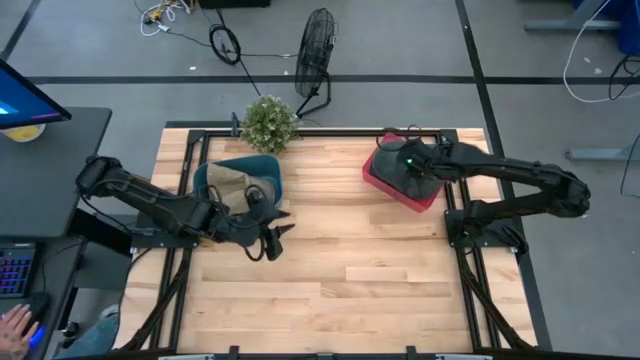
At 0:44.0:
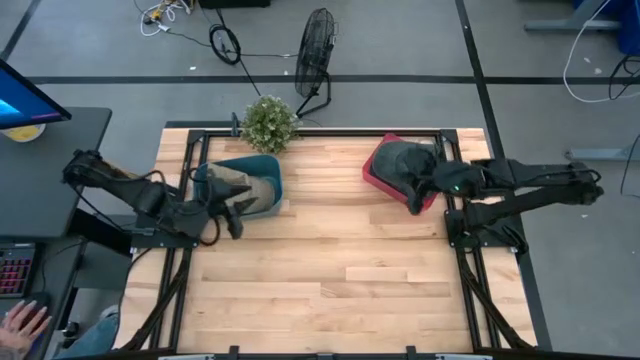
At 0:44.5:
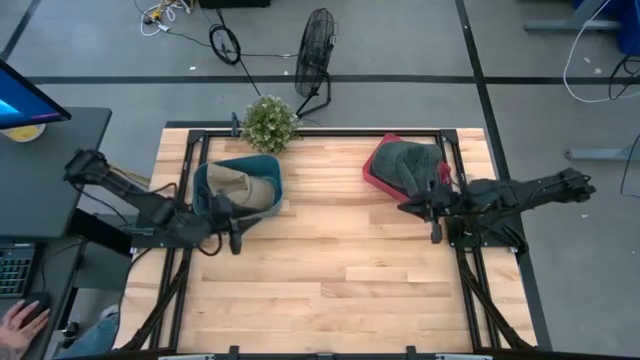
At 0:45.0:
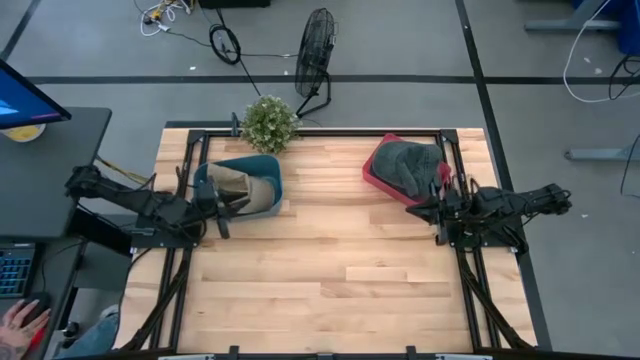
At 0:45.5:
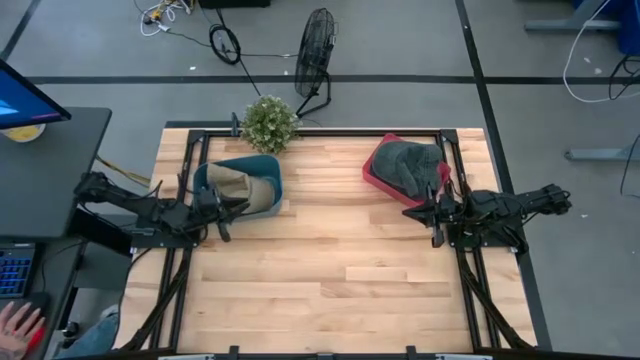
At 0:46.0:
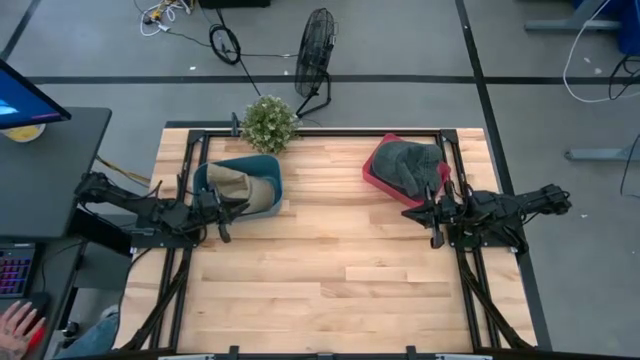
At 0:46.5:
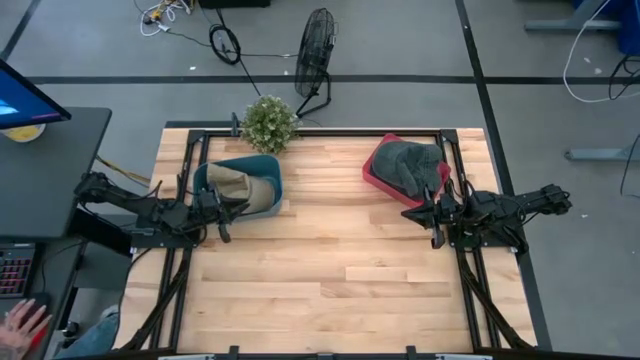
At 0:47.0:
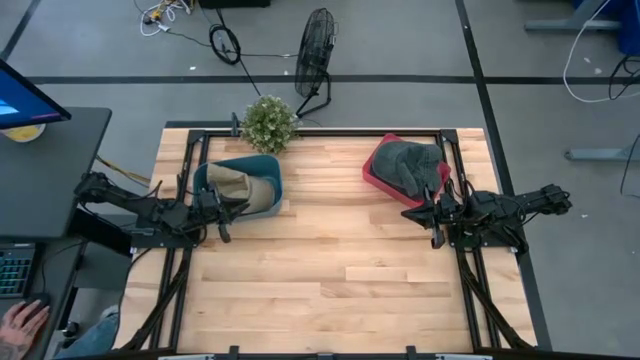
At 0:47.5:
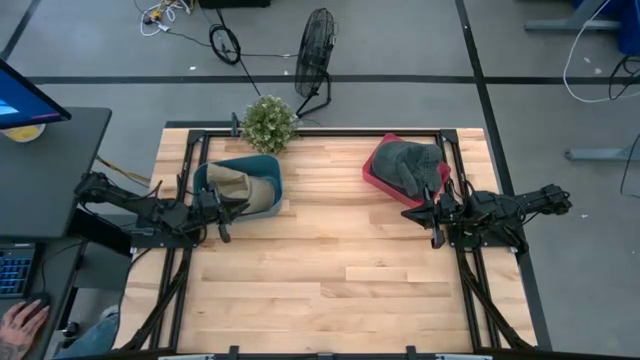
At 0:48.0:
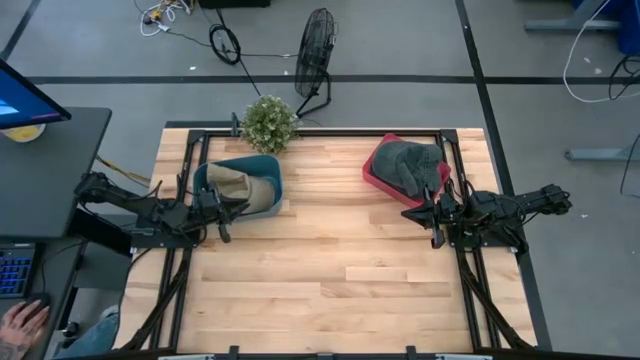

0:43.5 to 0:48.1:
Task: Pick & Place hat
Return to Home Position

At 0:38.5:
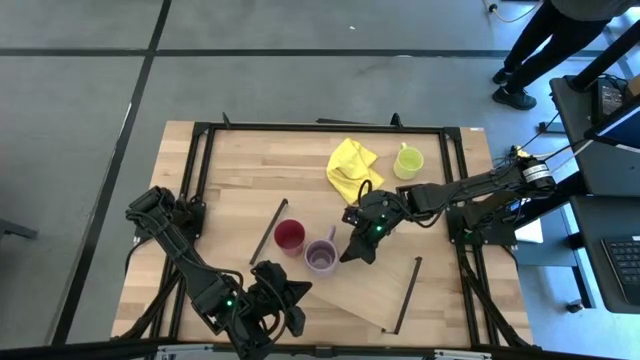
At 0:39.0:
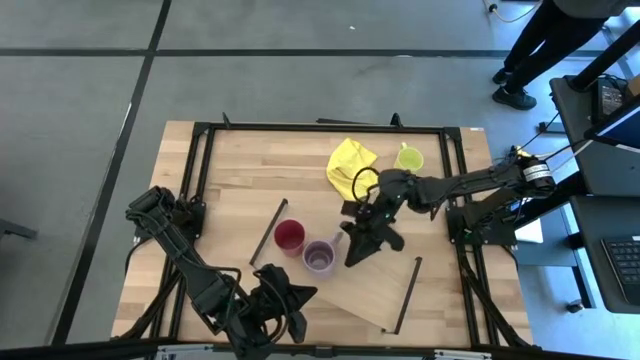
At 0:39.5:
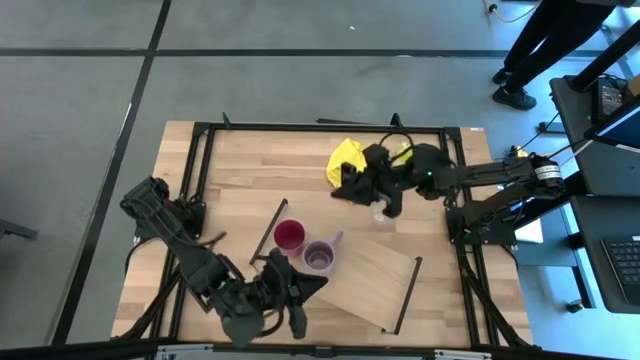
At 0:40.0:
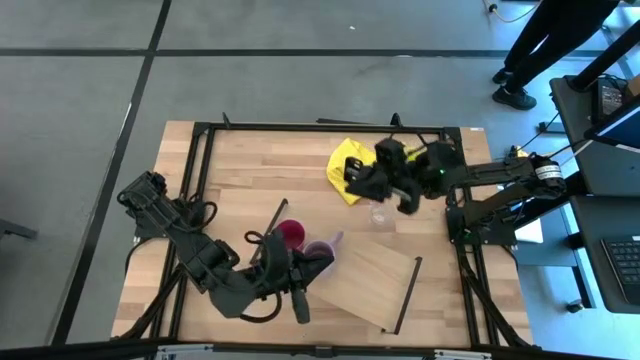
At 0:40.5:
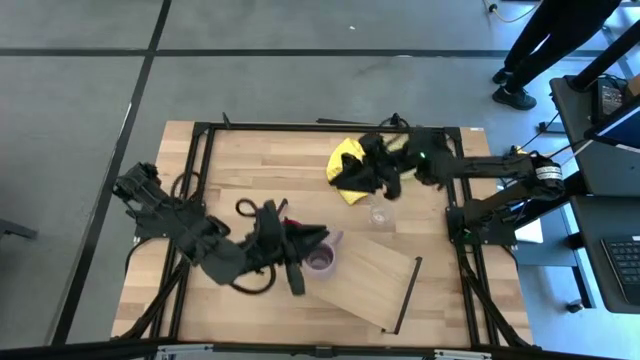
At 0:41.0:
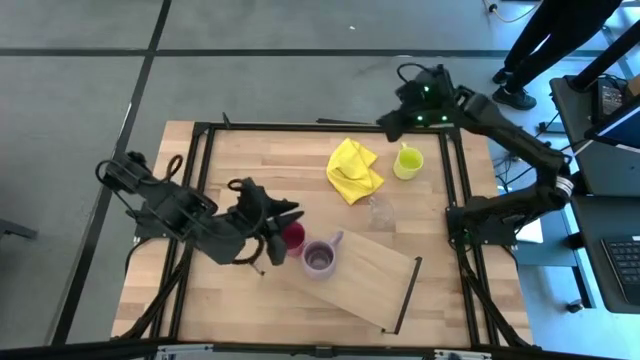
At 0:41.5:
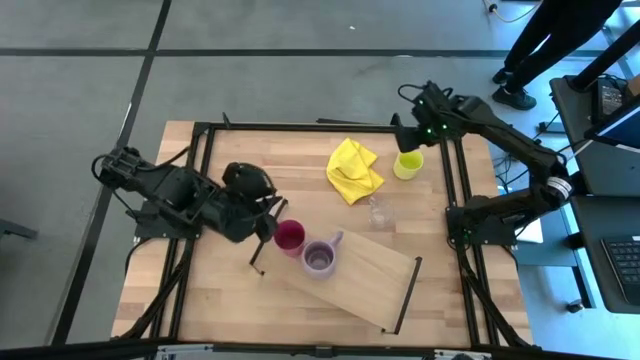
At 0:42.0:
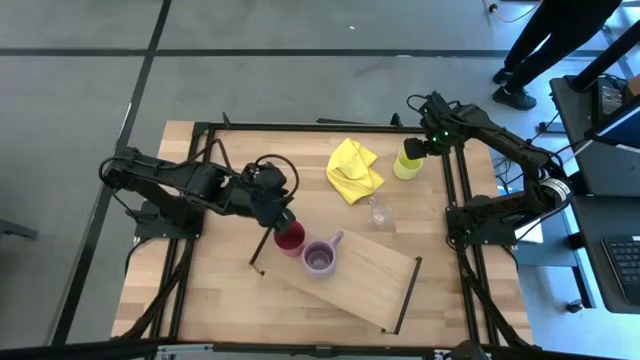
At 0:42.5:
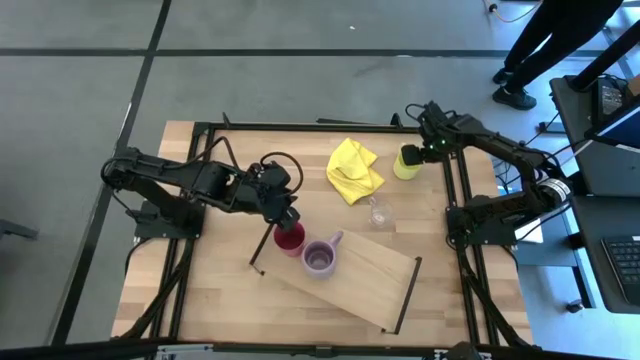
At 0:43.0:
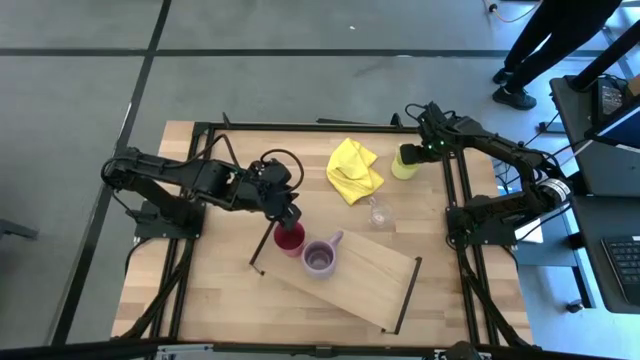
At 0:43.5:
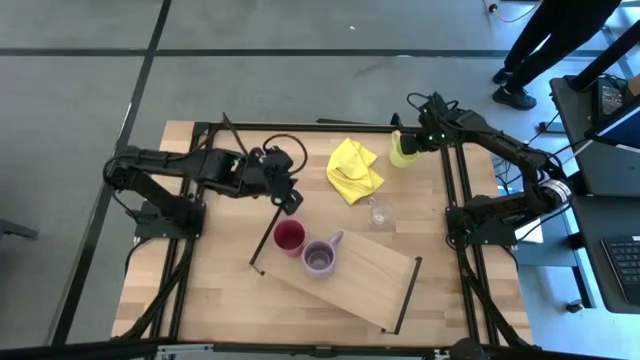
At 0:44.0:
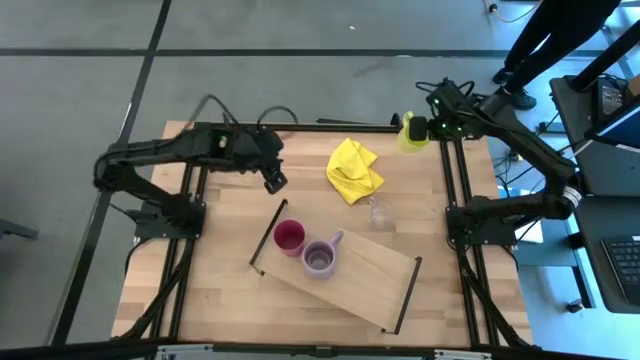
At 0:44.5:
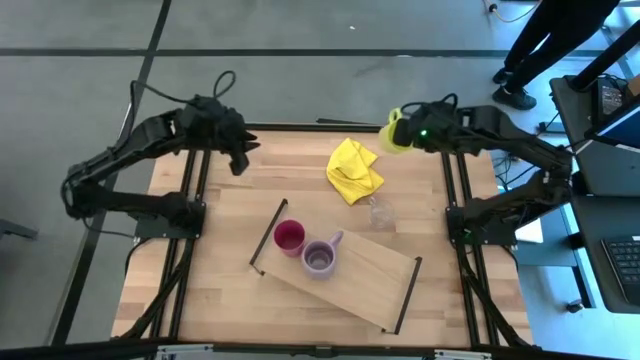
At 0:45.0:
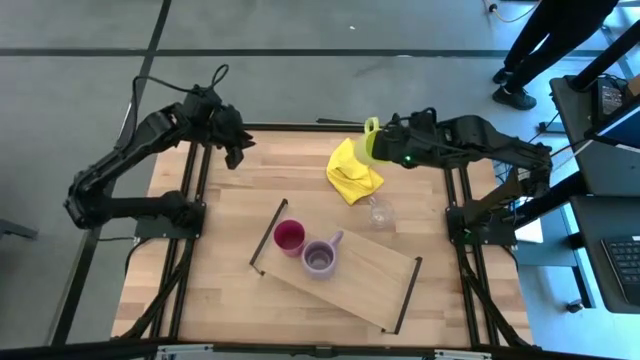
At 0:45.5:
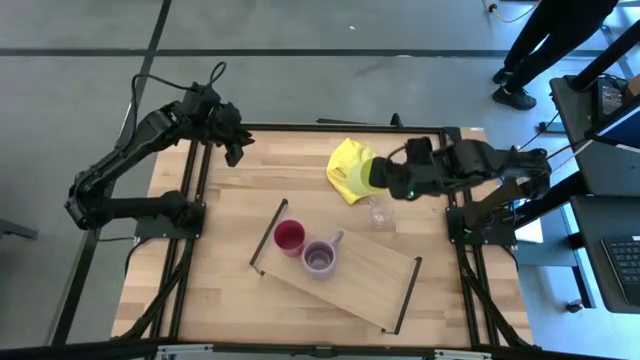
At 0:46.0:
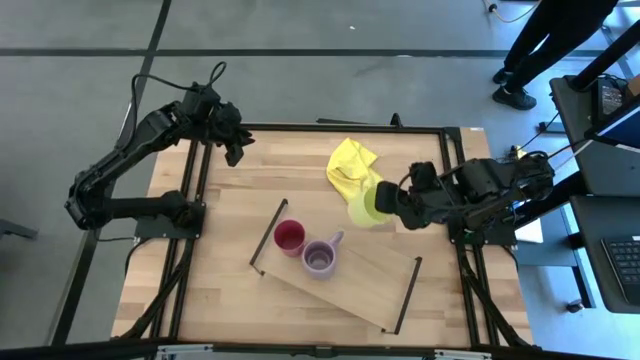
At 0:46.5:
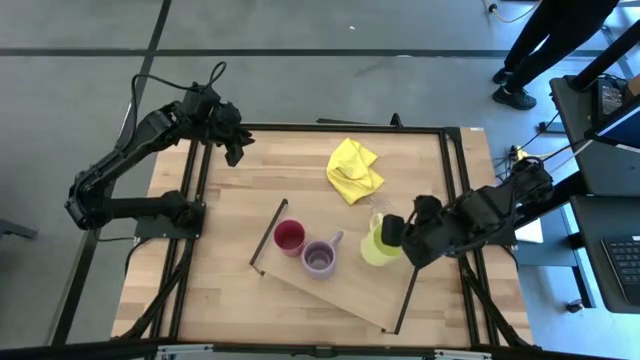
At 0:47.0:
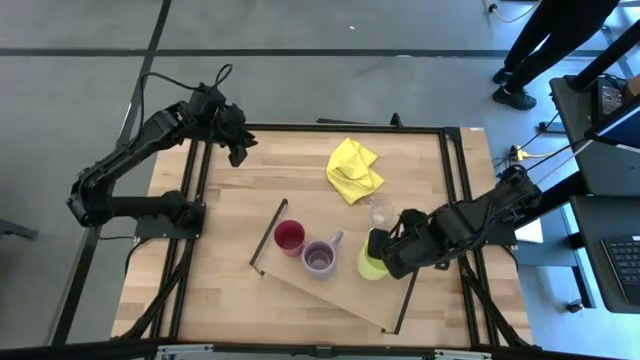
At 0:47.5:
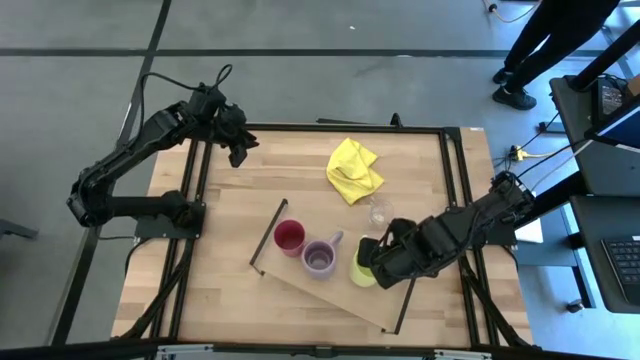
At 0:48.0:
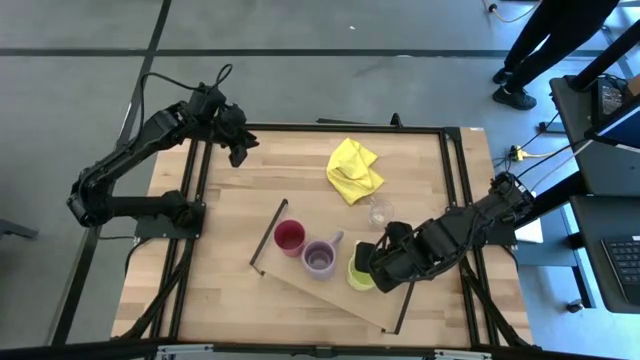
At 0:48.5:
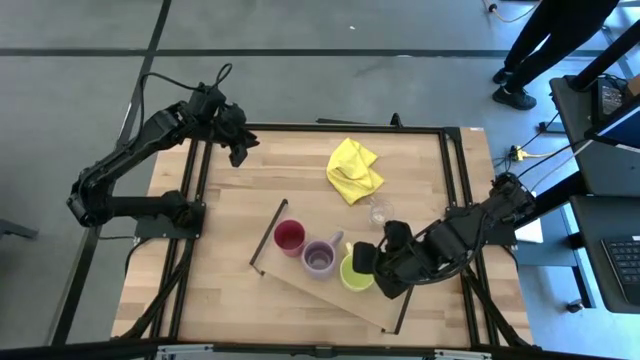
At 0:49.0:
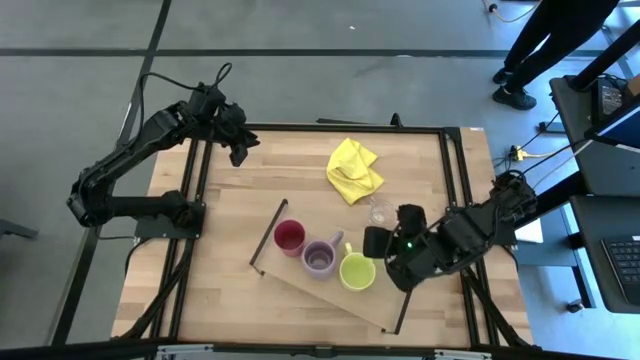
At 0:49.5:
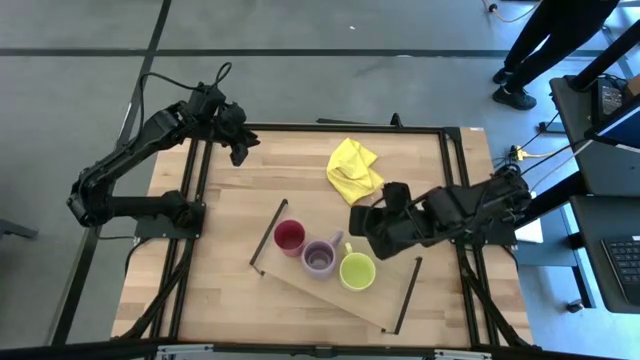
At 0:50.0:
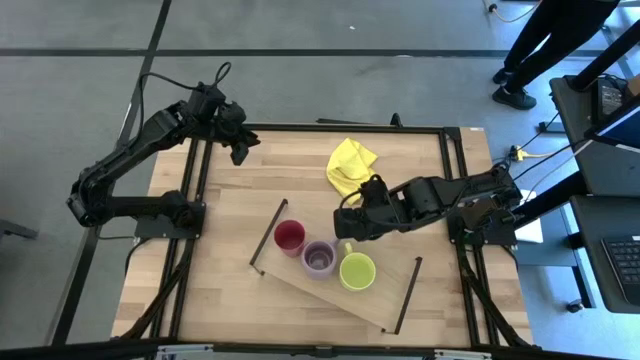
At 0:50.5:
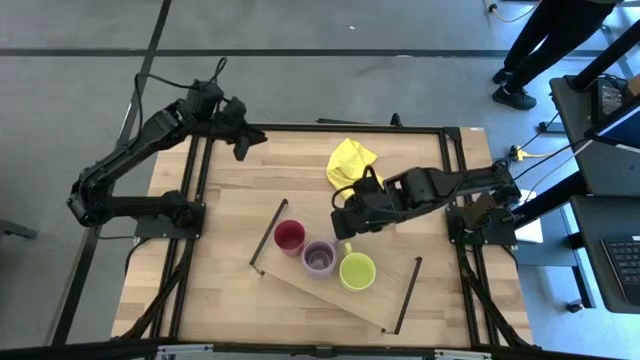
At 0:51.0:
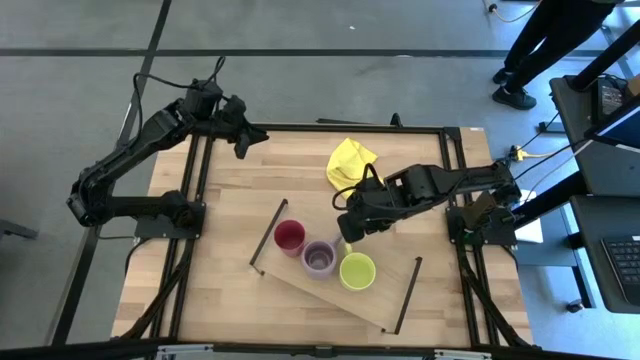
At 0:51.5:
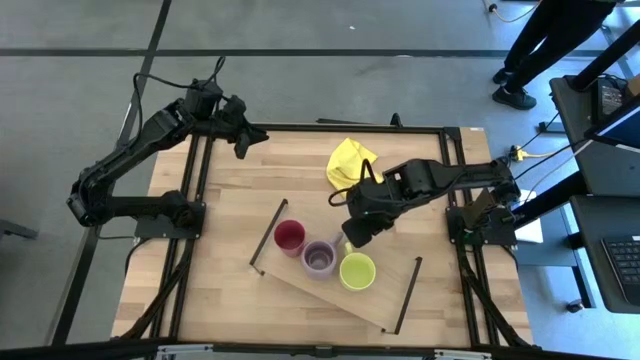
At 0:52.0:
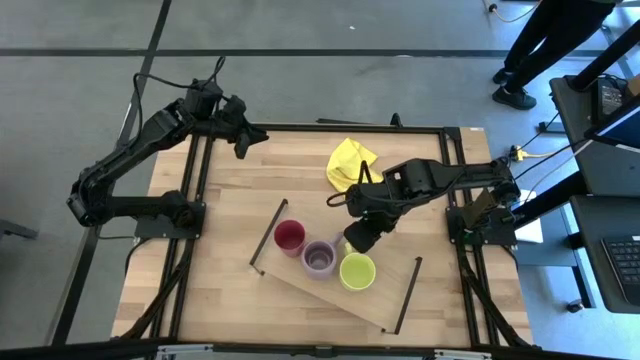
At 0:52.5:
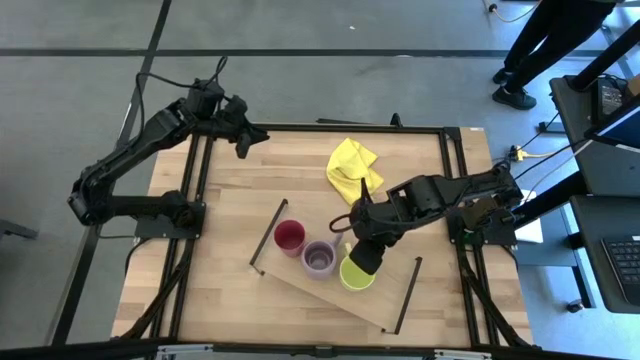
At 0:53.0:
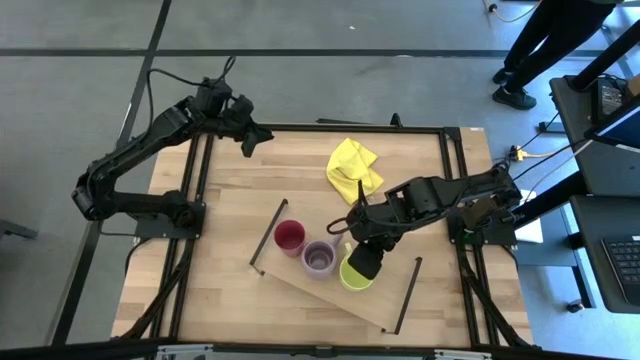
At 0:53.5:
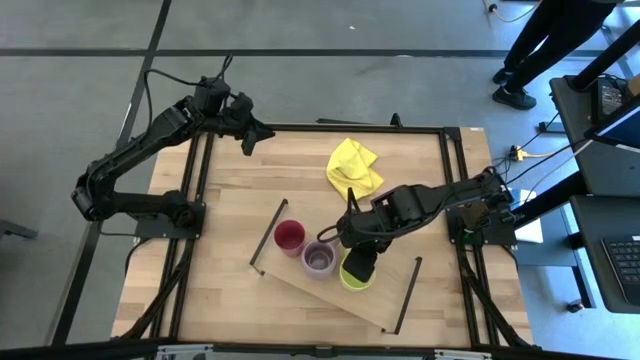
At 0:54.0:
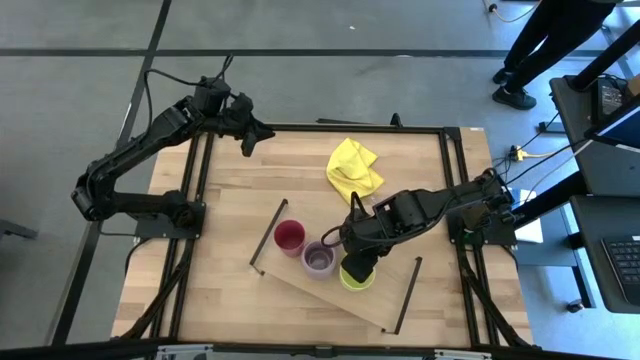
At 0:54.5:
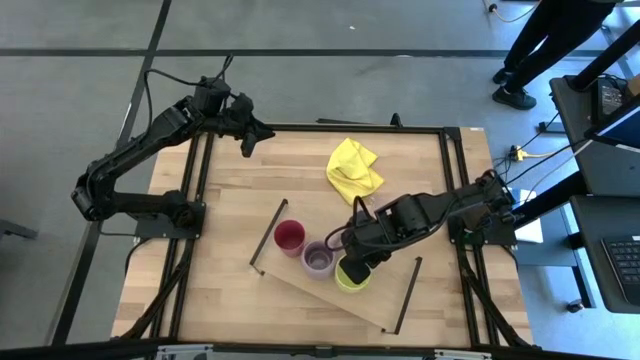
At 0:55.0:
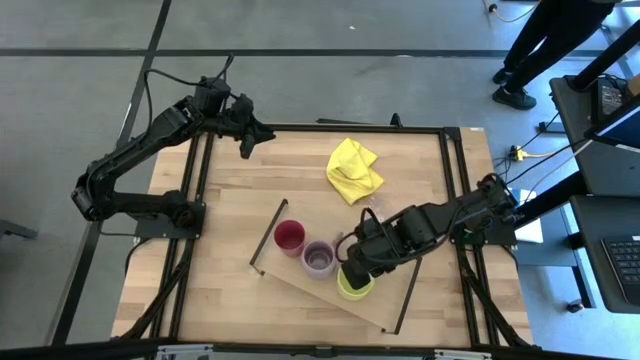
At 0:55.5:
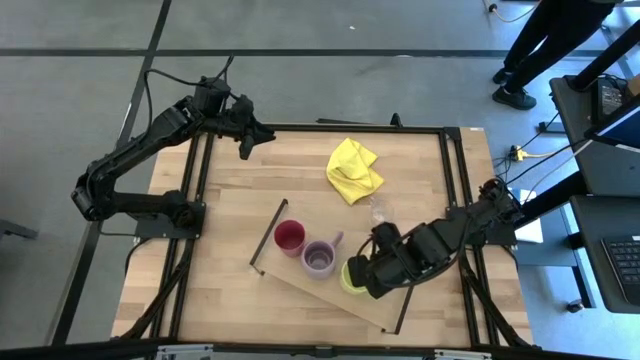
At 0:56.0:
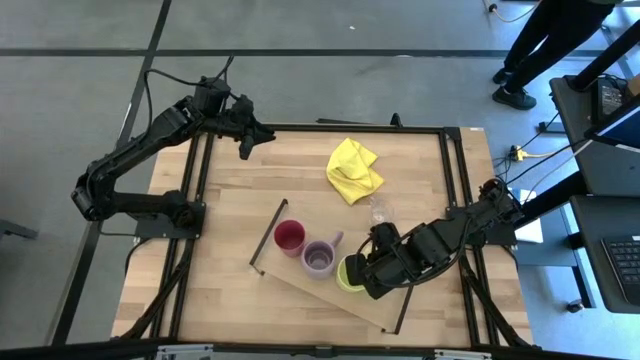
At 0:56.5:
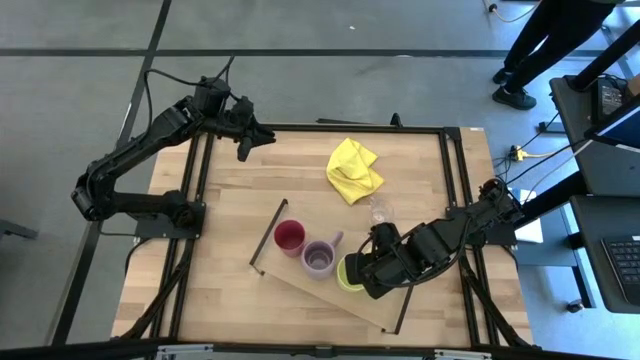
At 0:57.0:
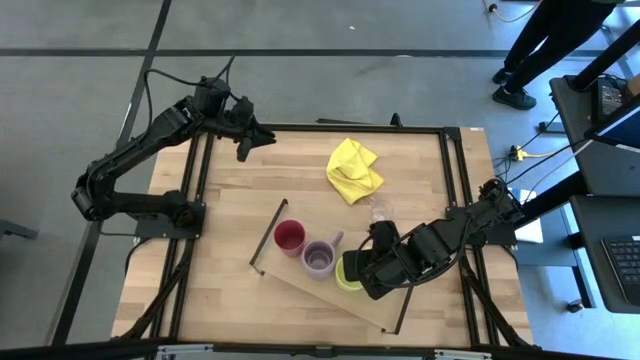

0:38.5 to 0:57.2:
Task: Stack small to large cups/mugs on shelf
Put the yellow mug on the shelf
